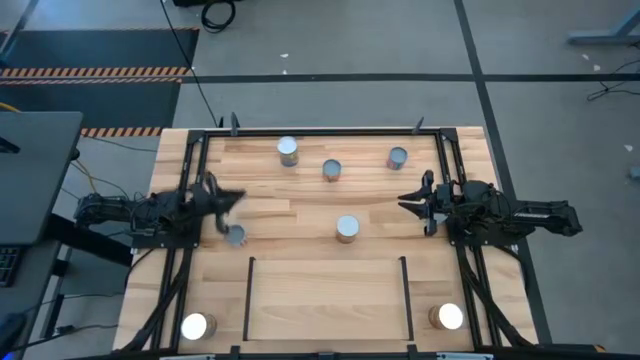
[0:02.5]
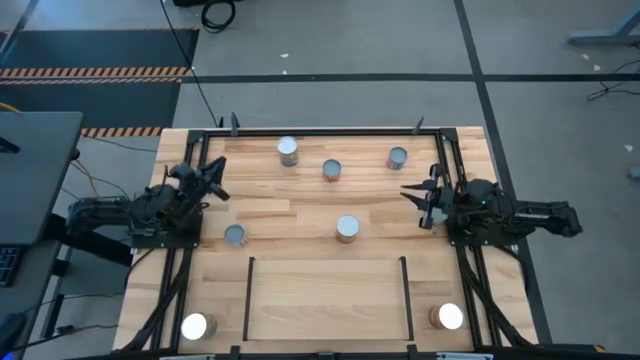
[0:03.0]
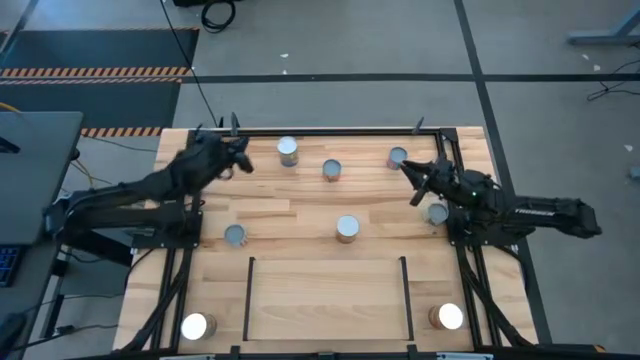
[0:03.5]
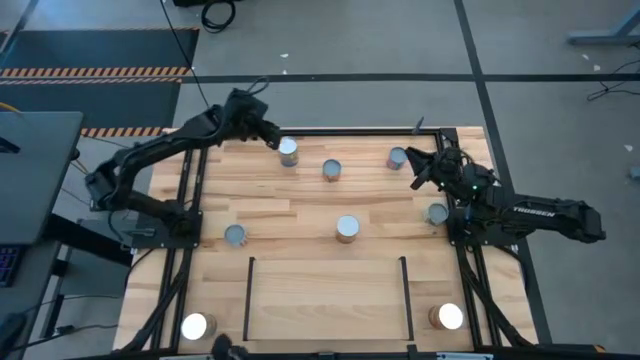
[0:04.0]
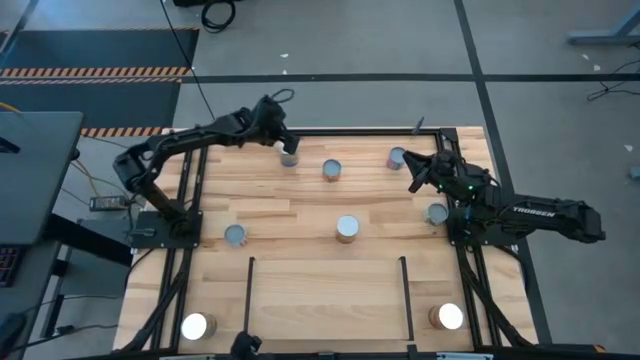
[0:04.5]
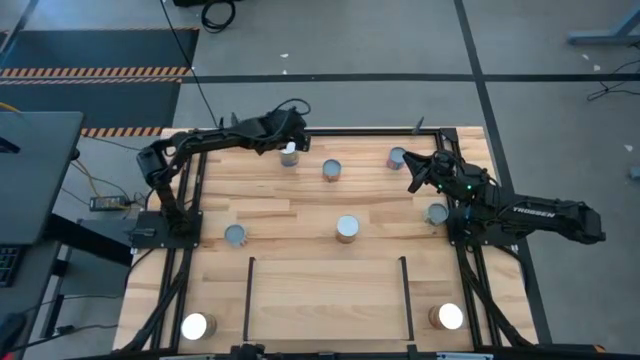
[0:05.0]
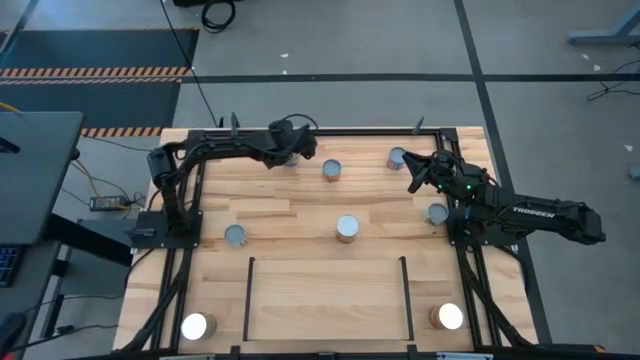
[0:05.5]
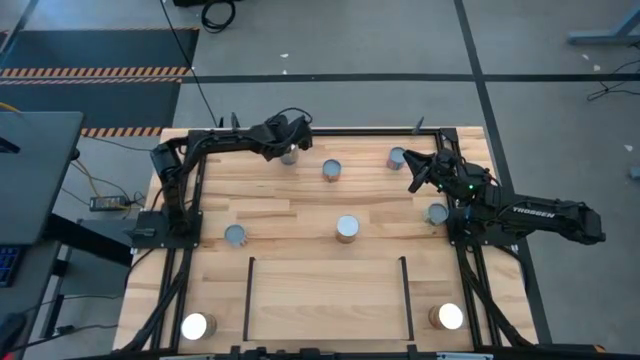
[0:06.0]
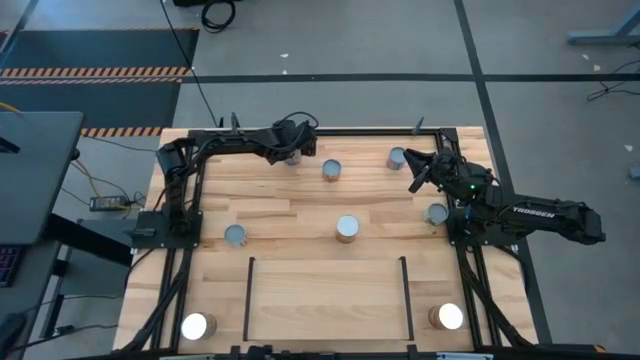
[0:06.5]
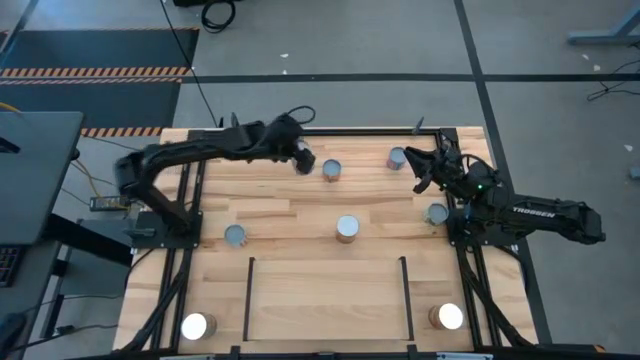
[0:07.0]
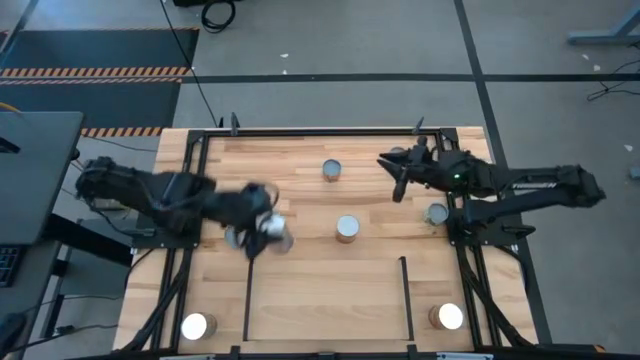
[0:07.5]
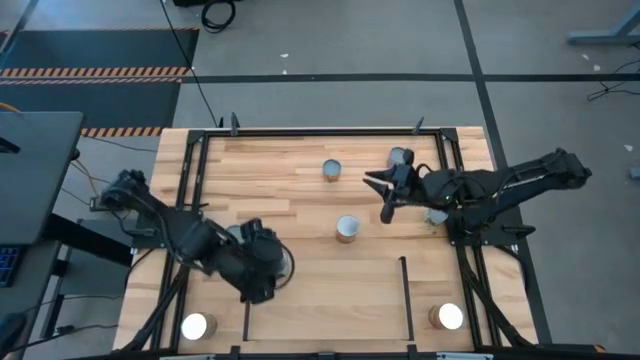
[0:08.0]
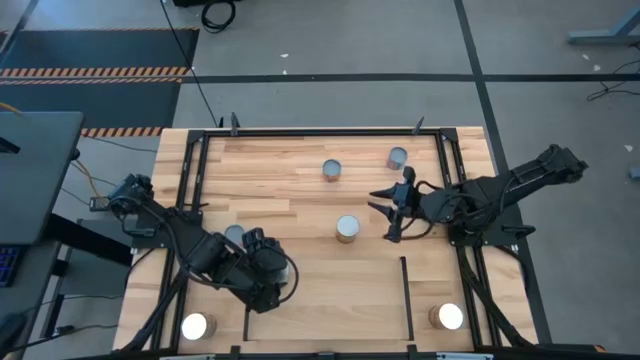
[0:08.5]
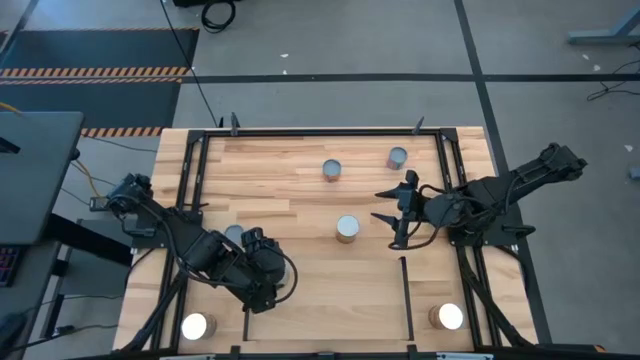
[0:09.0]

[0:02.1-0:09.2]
Task: Pick and place cans onto a shelf
Put the top canned peaches on the shelf

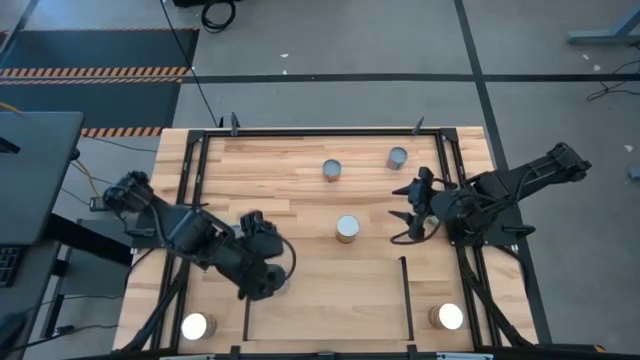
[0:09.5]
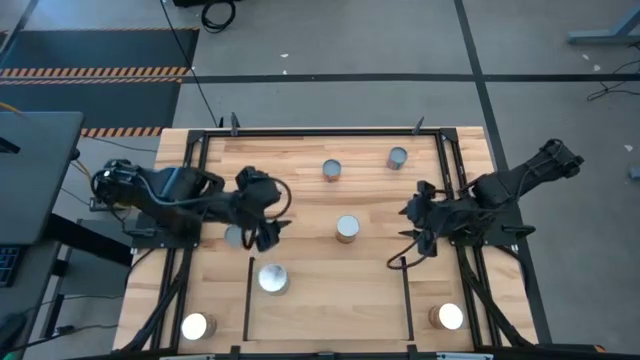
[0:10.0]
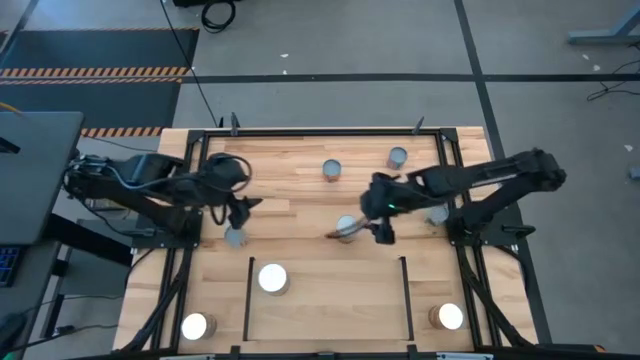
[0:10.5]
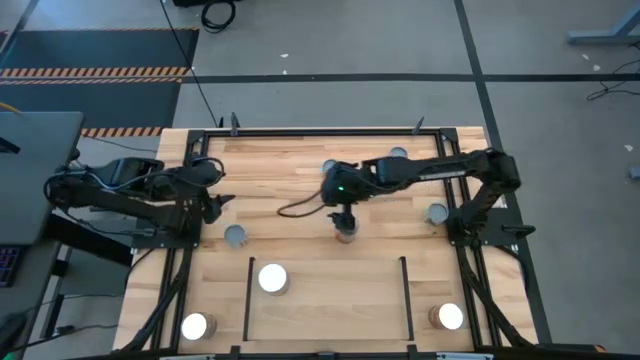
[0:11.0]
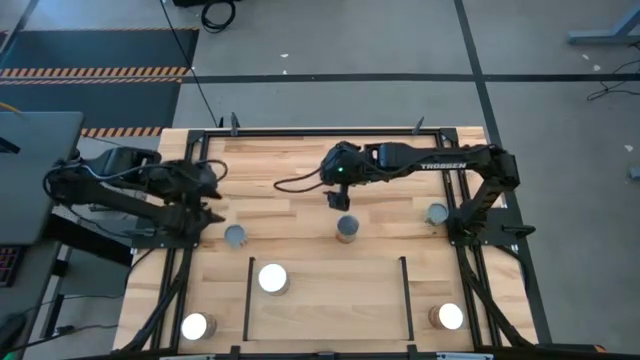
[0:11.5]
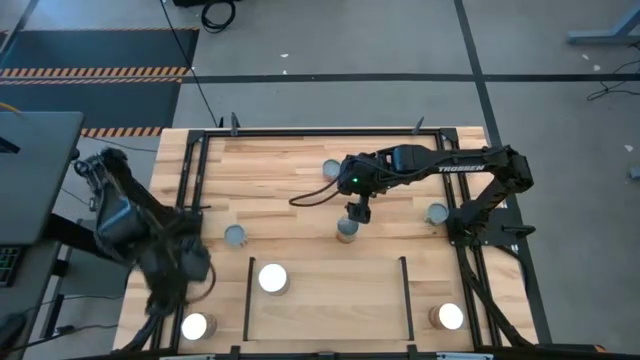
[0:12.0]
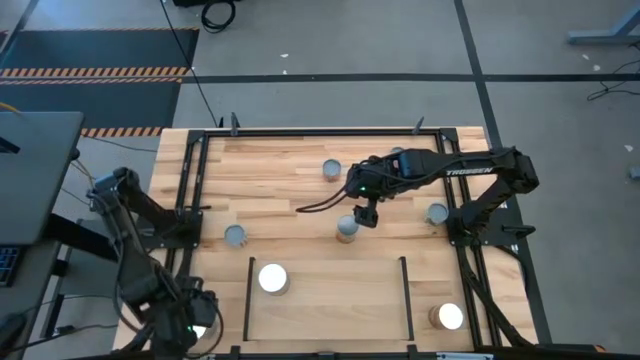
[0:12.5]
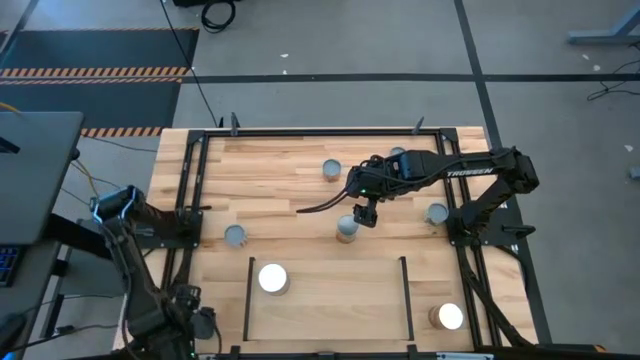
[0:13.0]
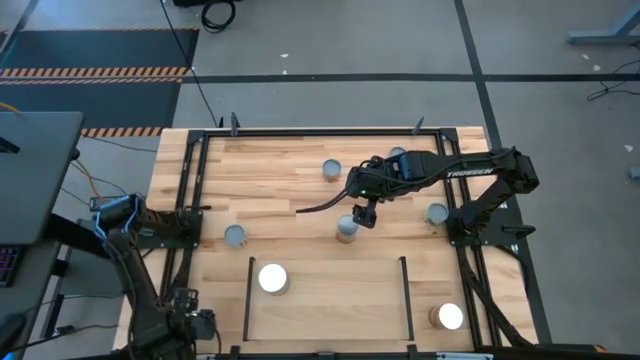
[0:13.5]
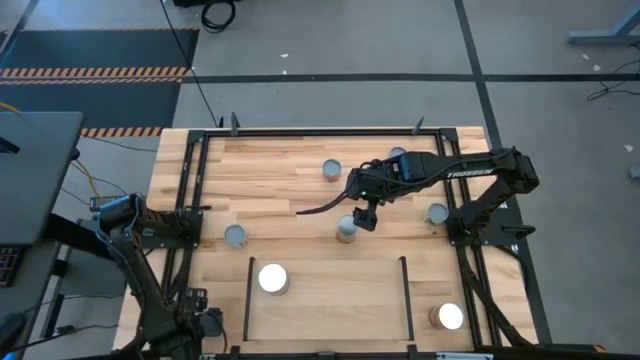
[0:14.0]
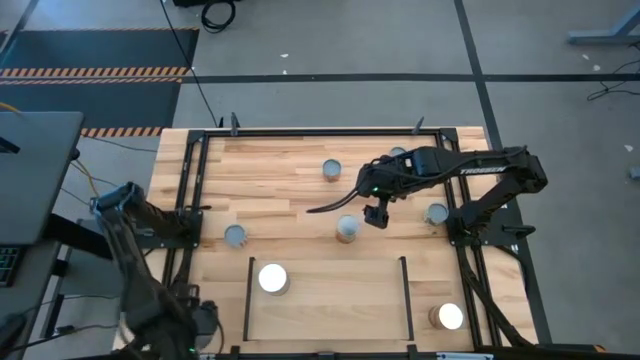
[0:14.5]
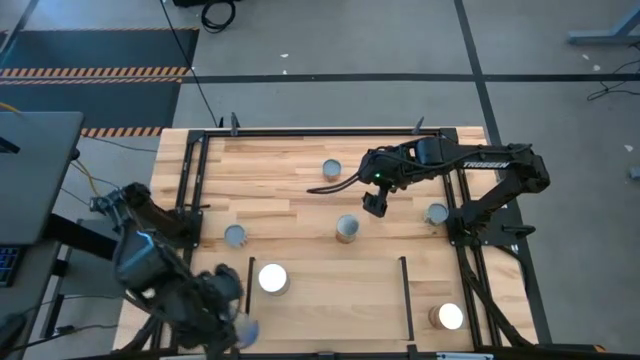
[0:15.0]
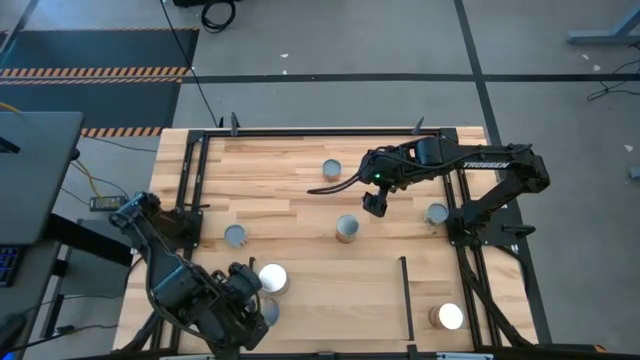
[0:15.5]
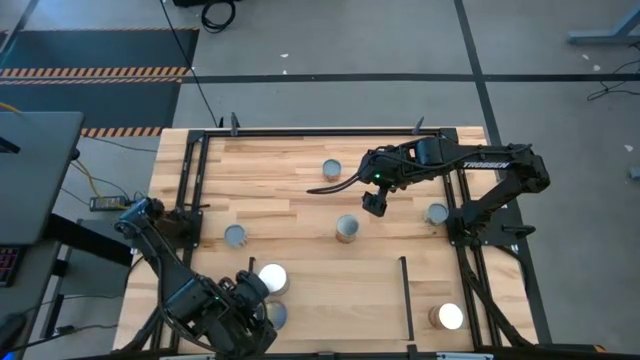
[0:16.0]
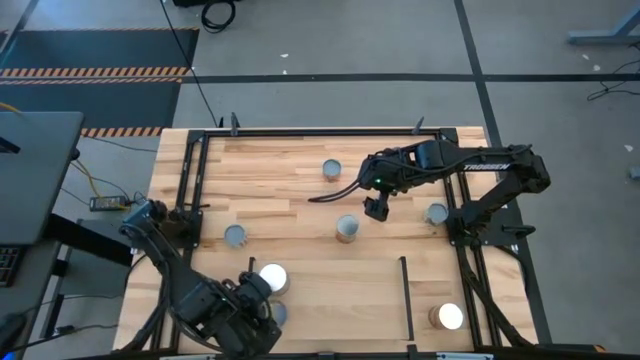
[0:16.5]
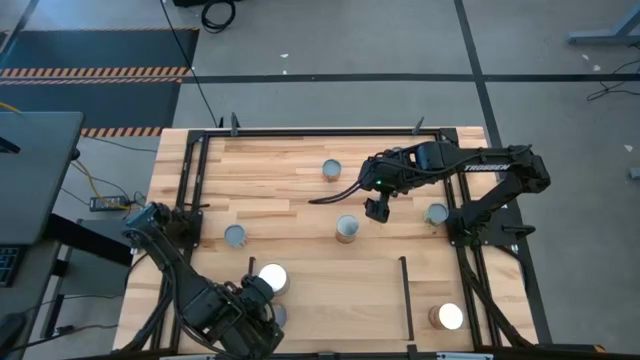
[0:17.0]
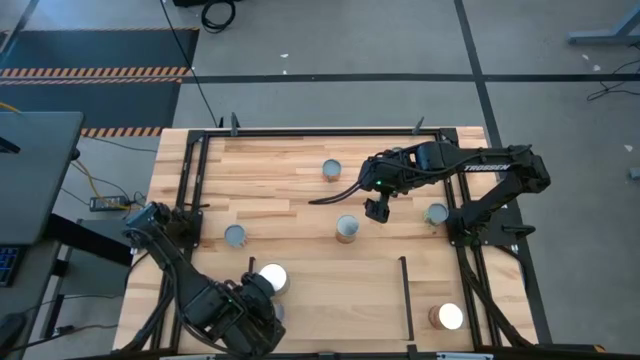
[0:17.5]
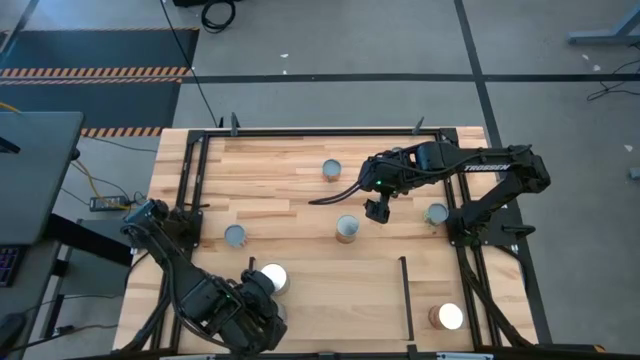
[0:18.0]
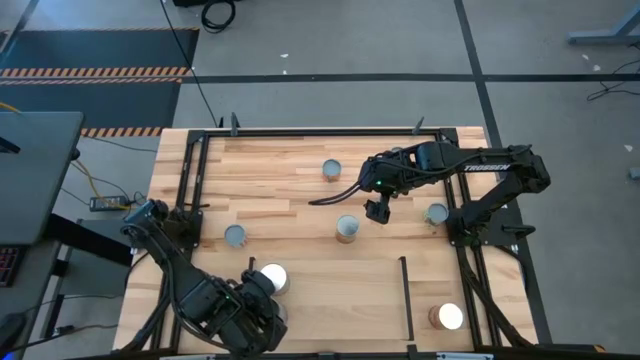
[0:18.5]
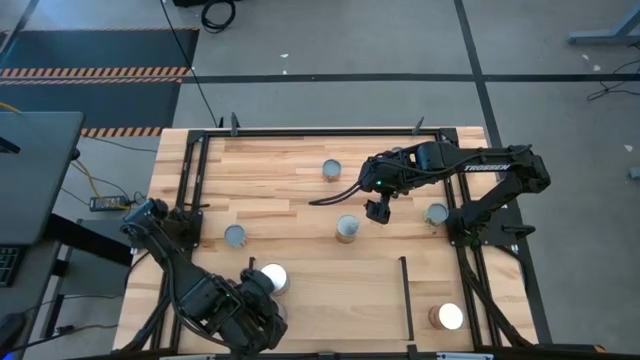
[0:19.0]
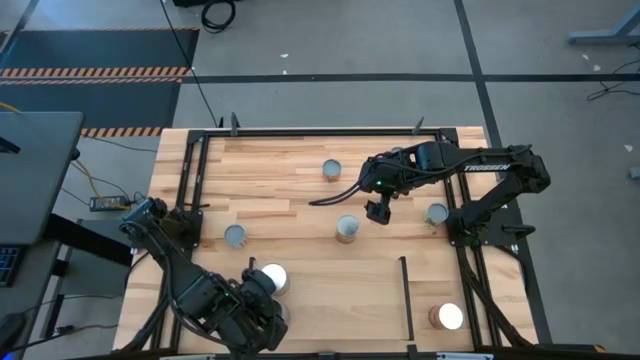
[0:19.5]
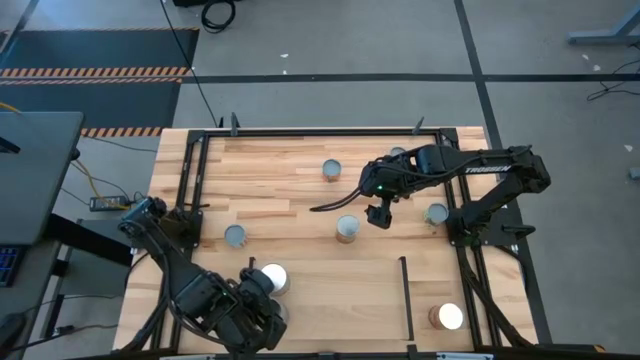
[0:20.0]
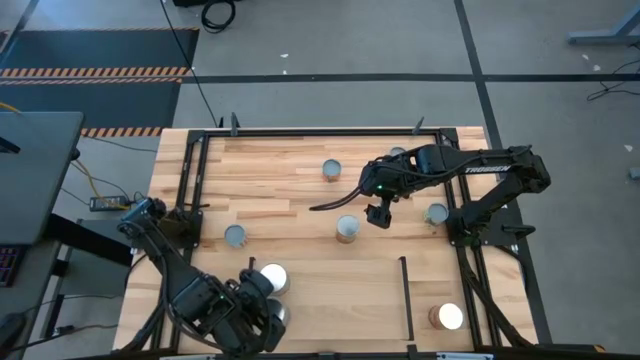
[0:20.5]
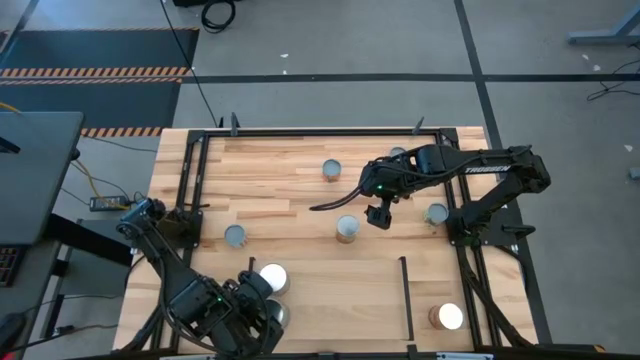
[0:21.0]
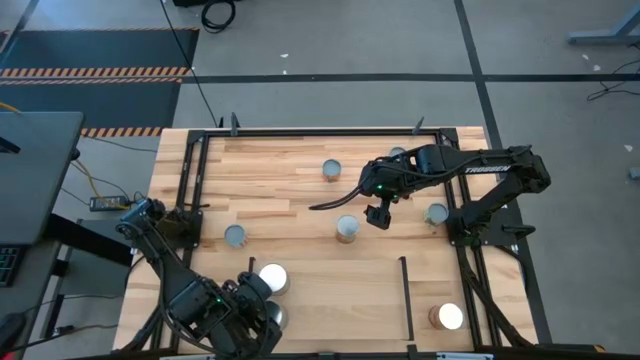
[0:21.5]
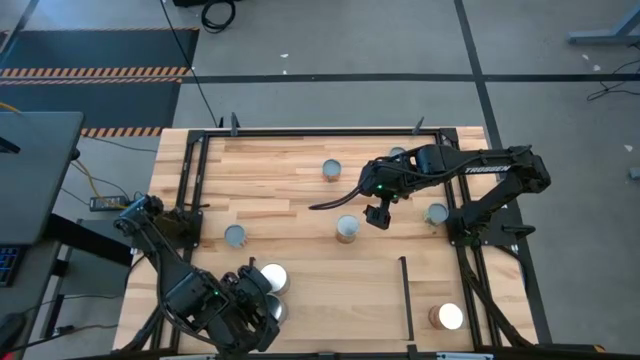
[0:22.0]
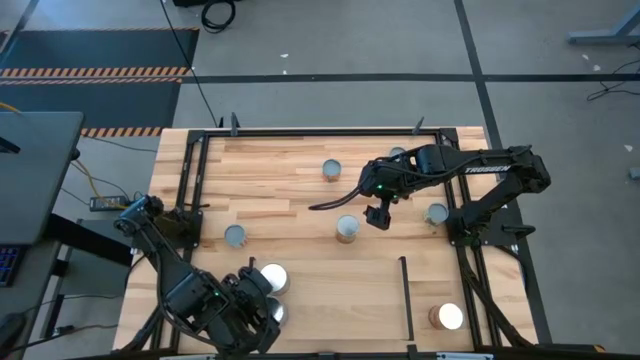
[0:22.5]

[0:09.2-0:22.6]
Put the canned peaches on the shelf aligned with the other canned peaches
